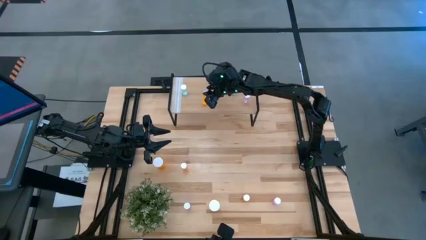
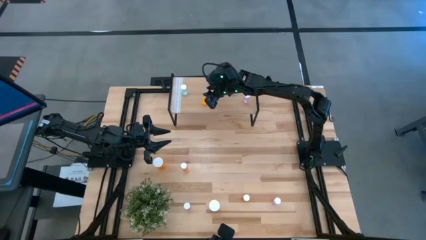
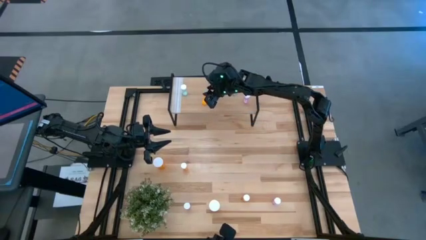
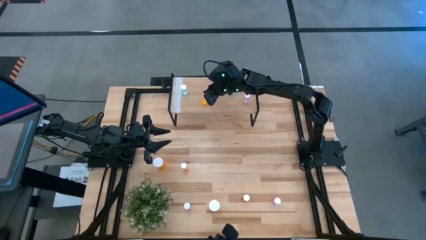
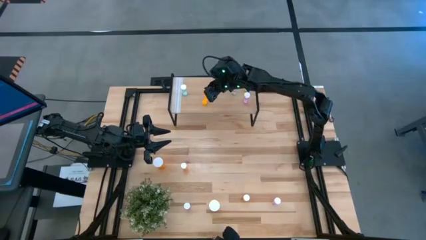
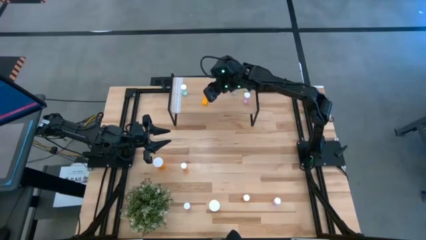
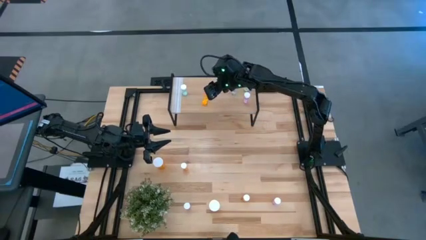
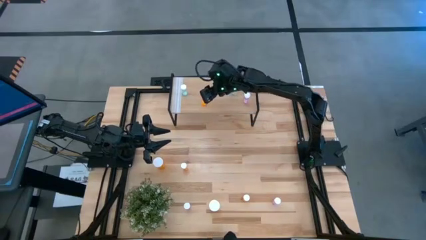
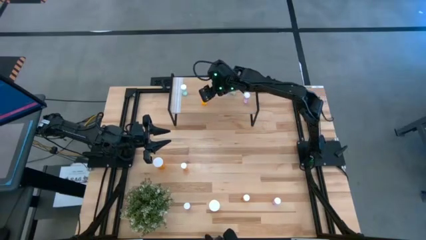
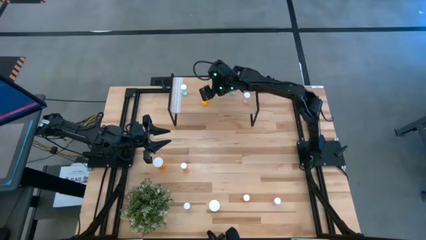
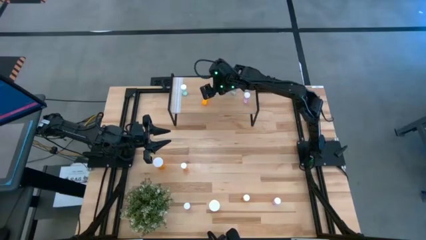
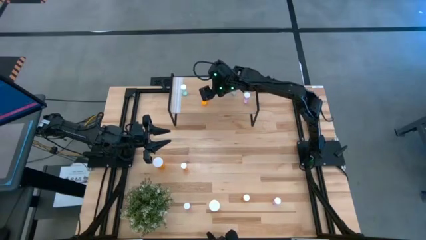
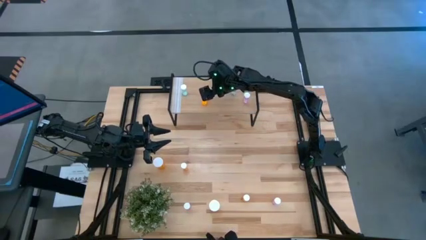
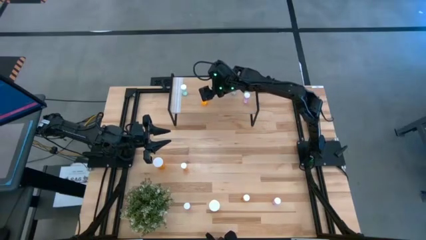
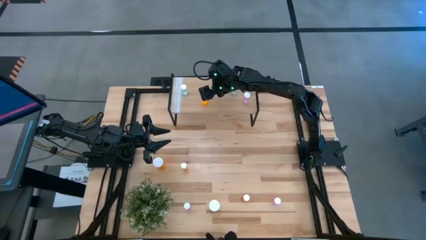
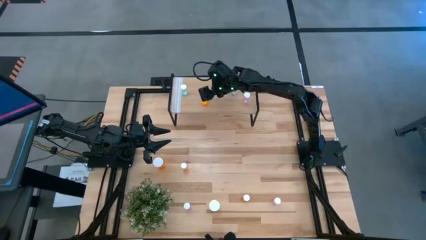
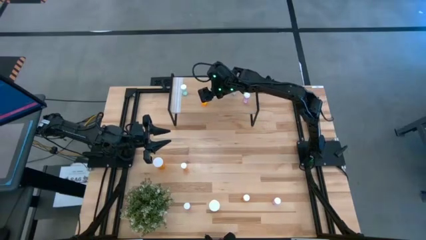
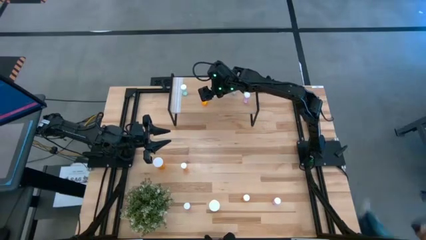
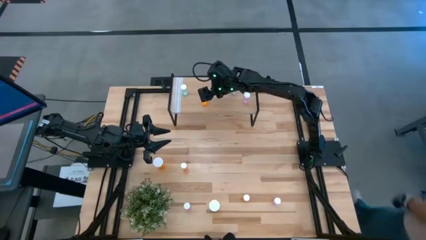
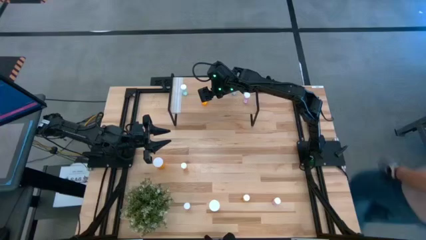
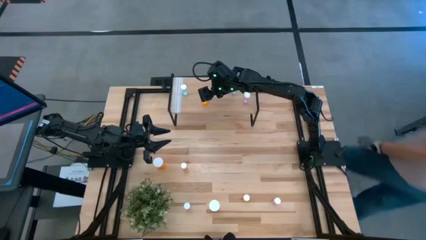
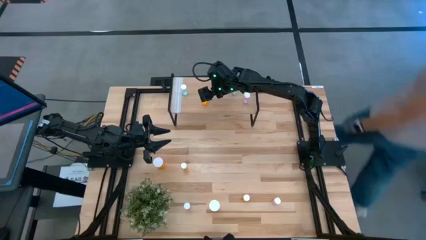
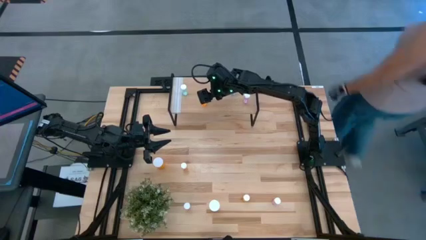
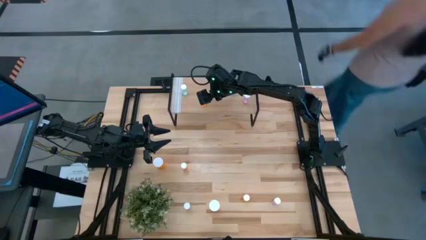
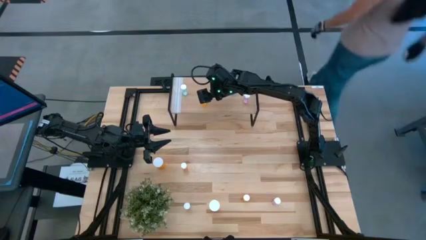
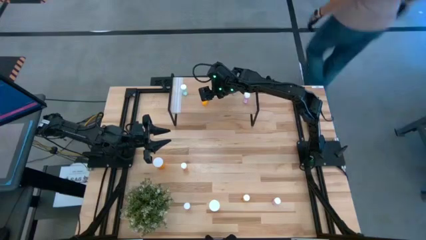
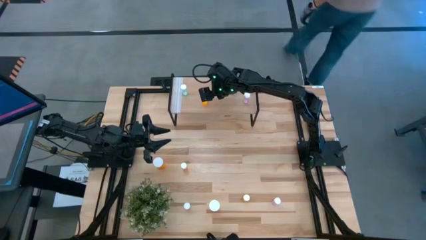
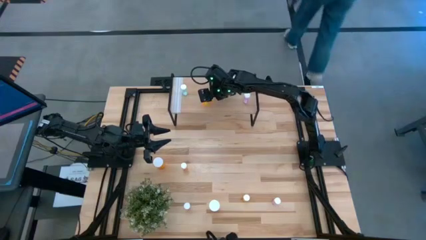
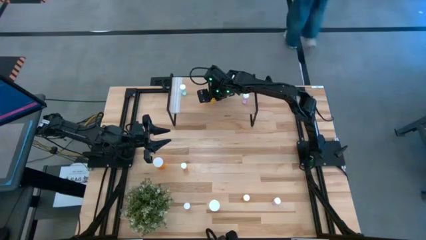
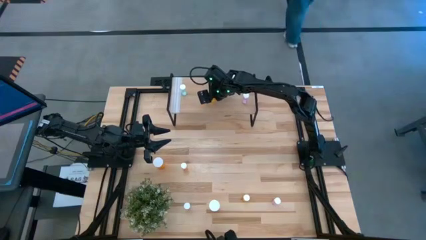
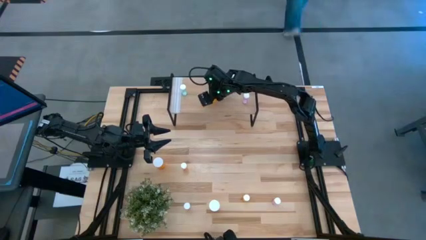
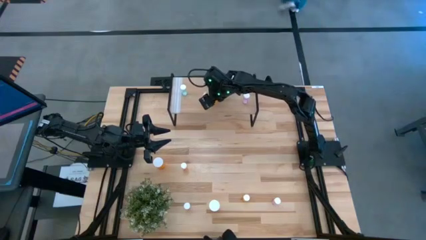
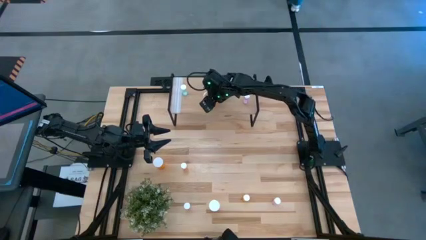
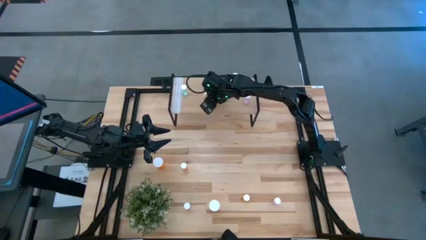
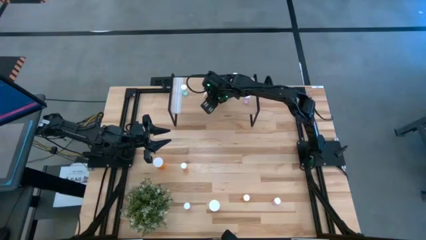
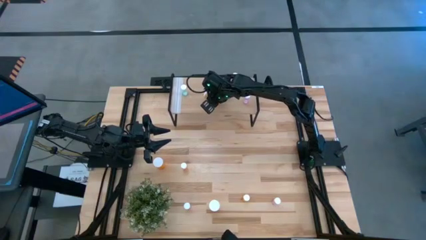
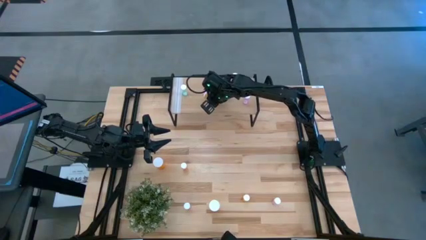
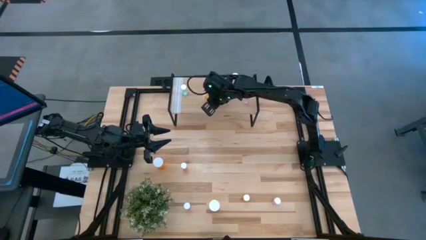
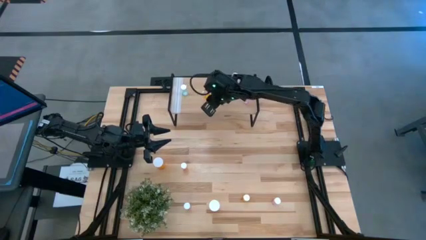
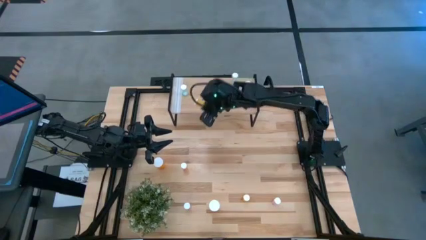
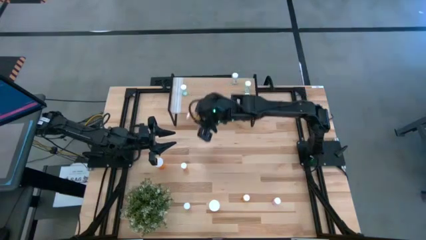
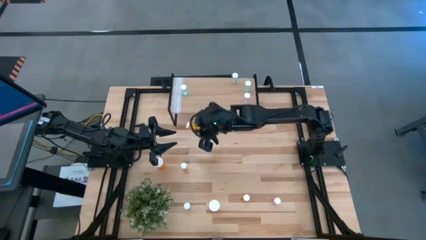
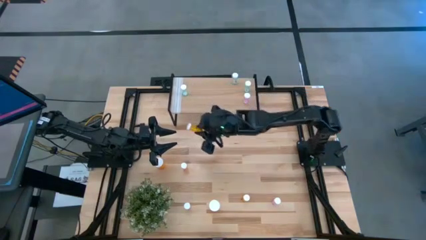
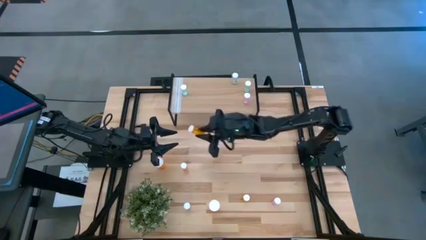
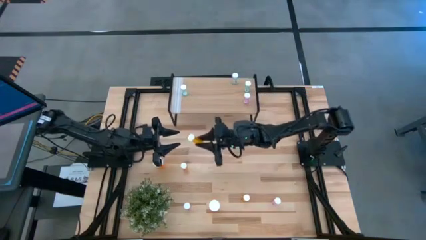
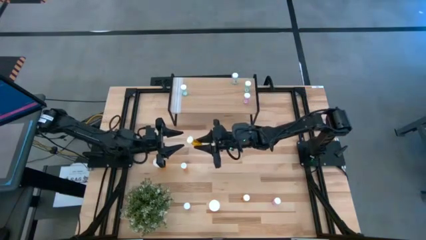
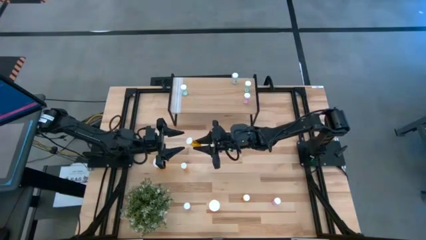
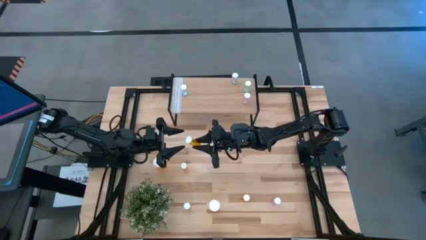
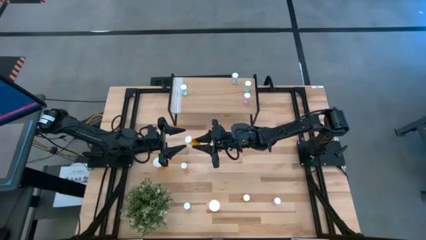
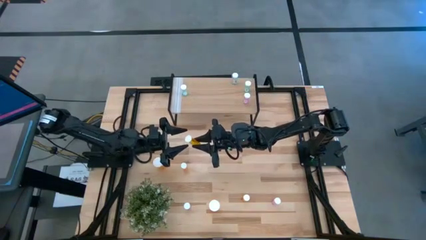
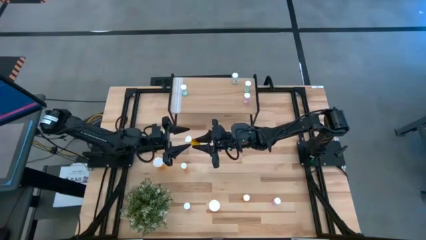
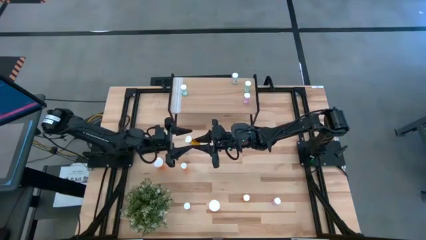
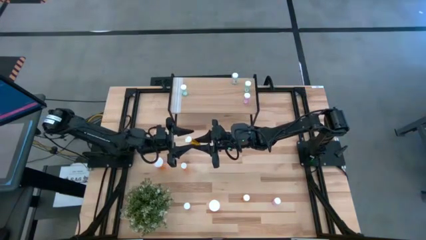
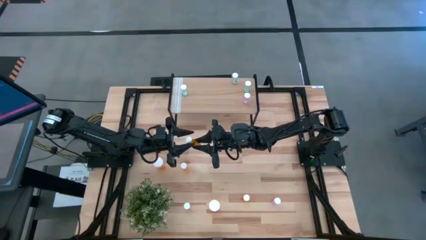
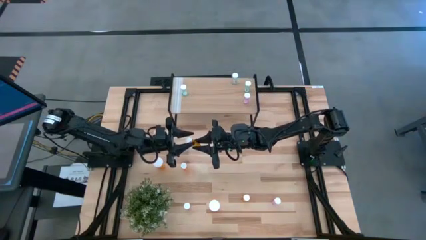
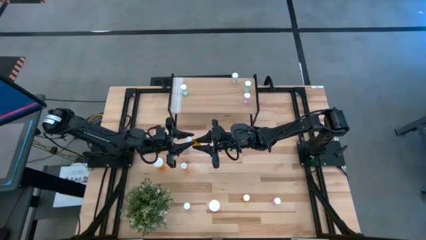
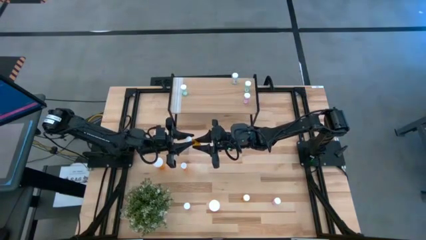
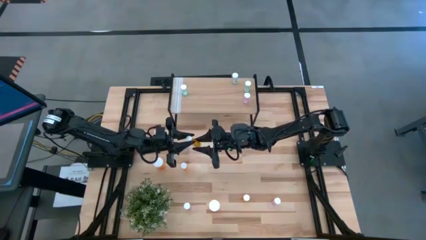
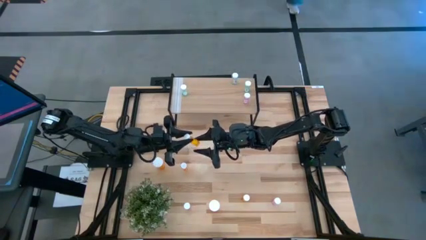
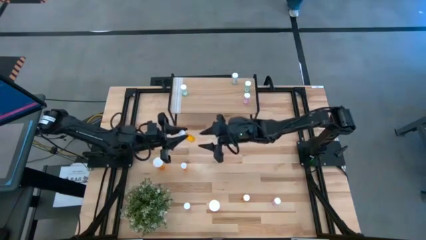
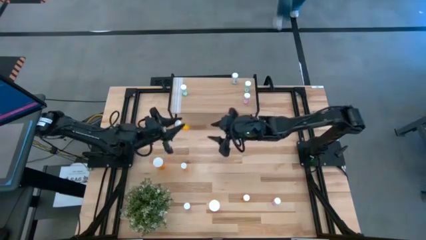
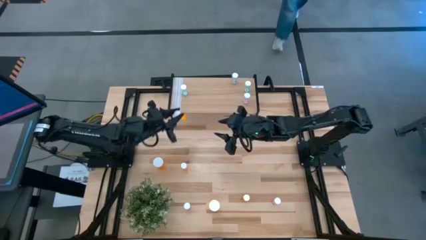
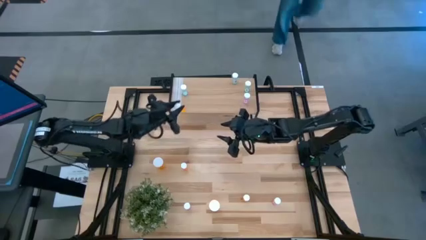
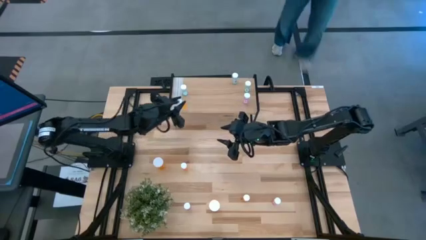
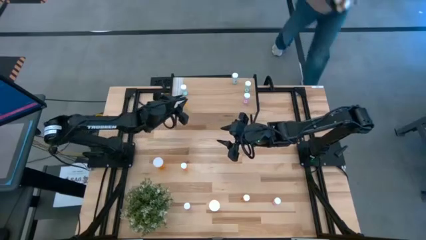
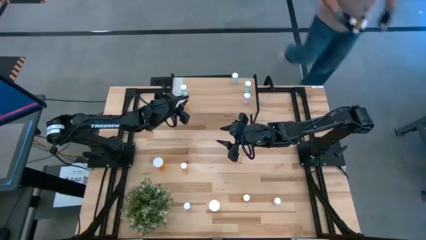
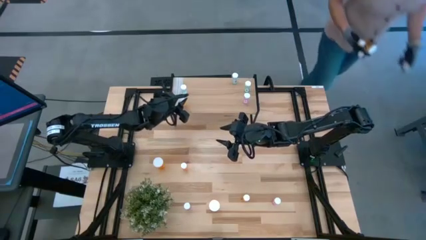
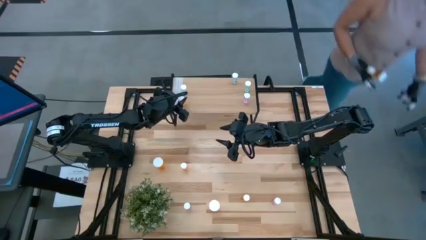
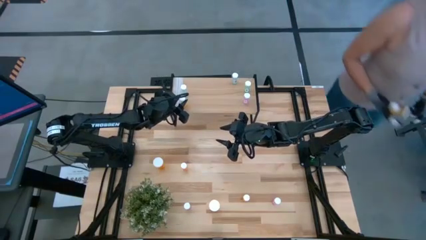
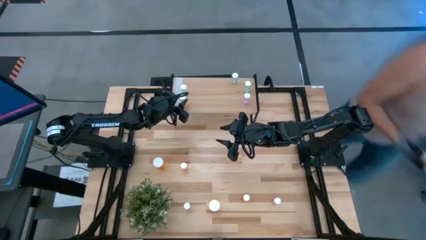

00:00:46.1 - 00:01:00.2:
Task: Pick and place medicine bottles onto shelf by color
Put the top right small orange bottle on the shelf

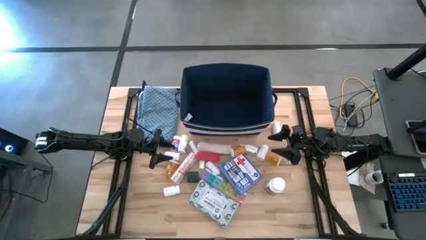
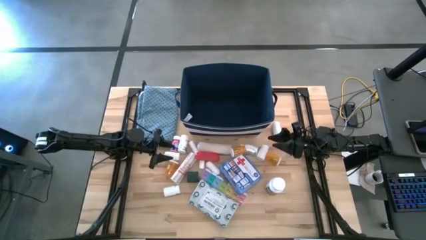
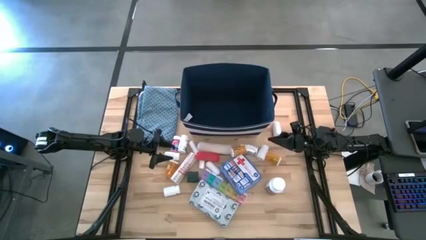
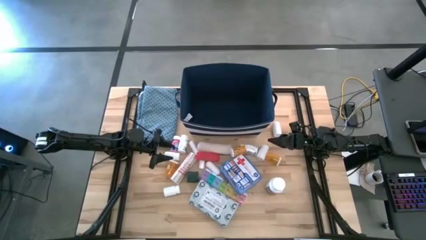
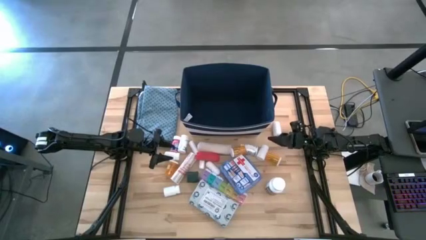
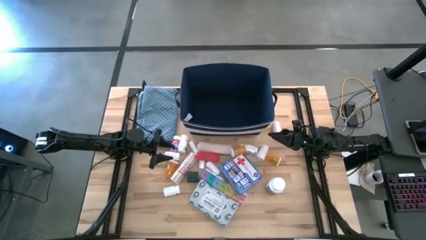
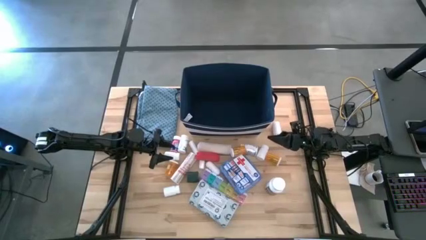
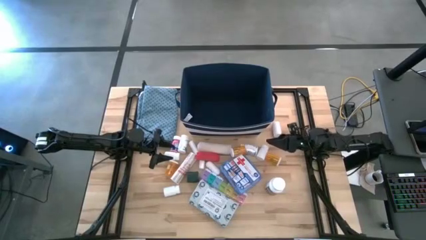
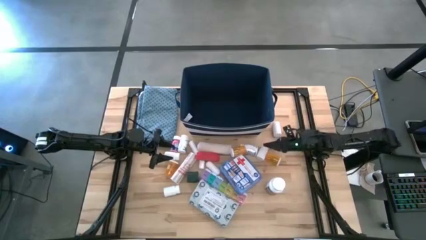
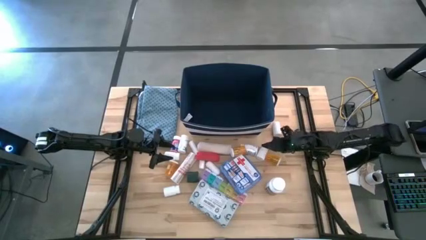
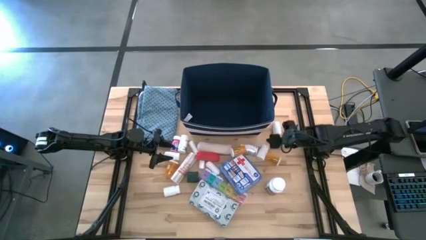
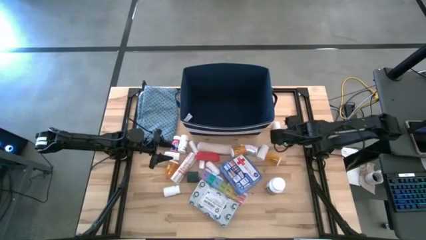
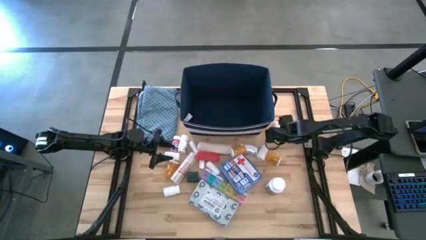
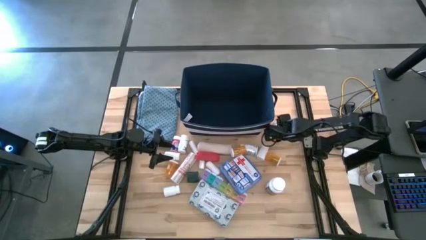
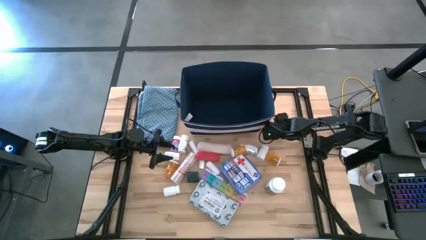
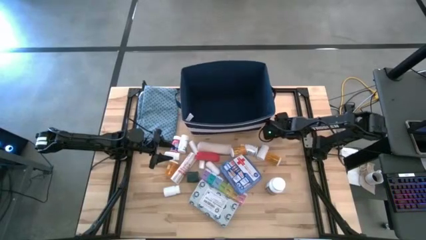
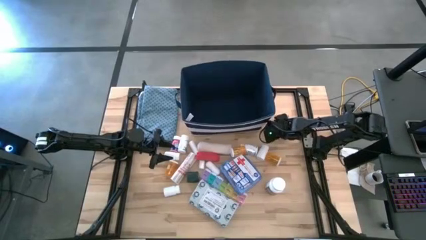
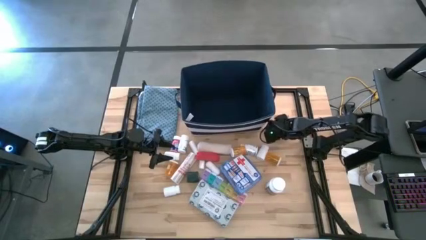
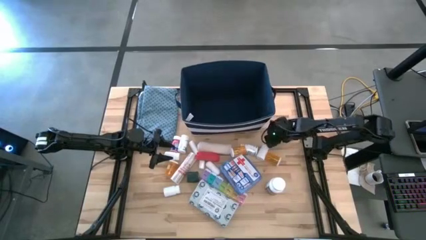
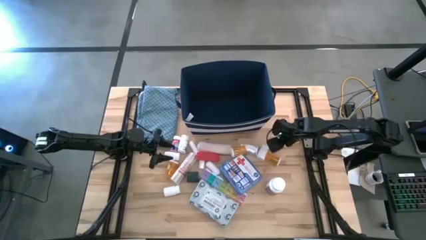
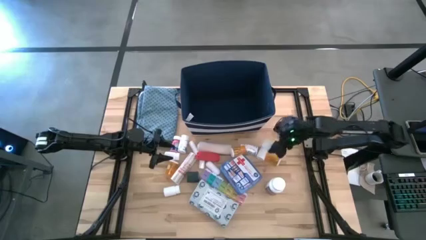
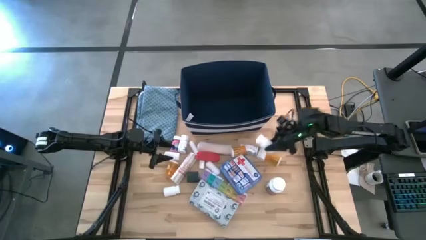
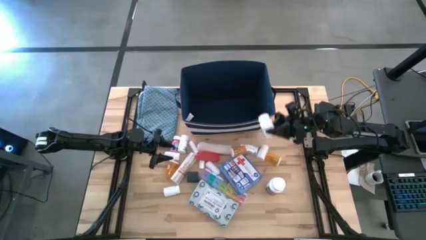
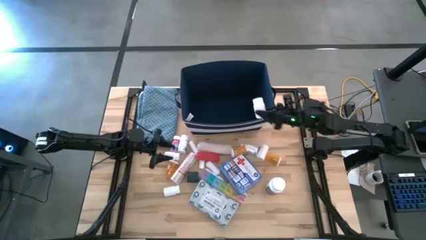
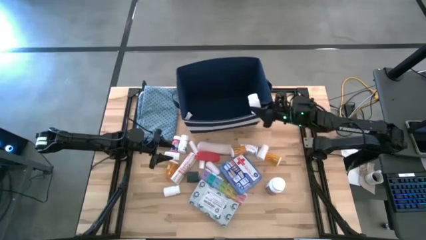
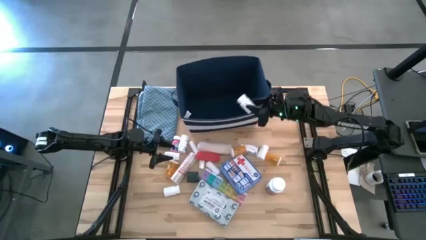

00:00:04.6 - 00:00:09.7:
Task: Pick & place medical supplies in basket/bin
Put the white pill bottle into the blue bin
